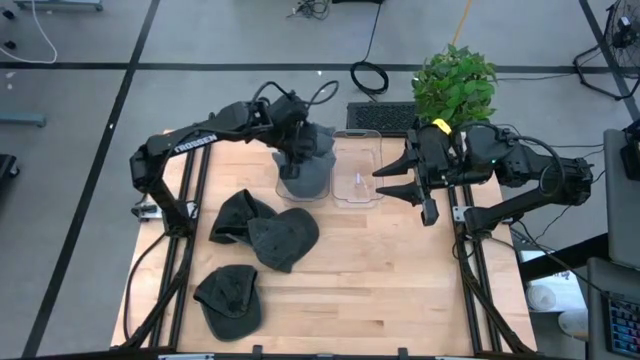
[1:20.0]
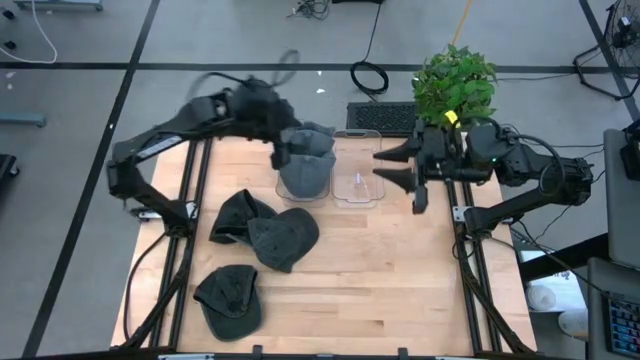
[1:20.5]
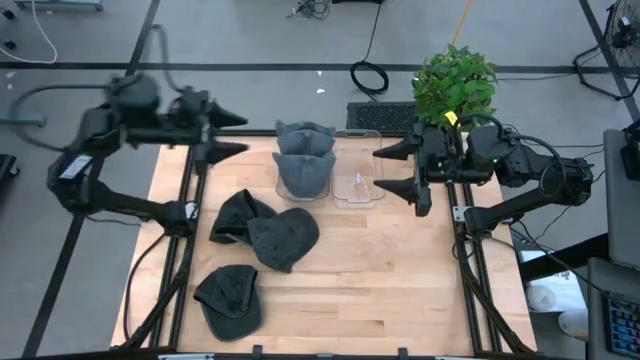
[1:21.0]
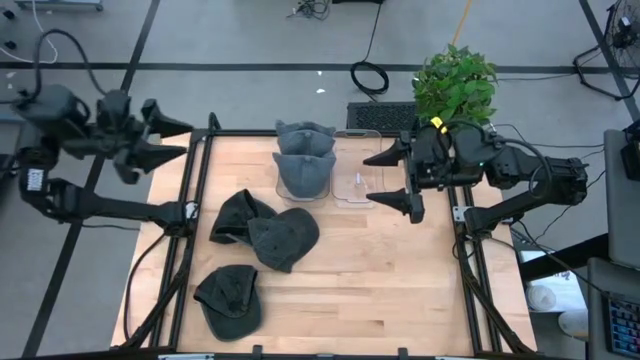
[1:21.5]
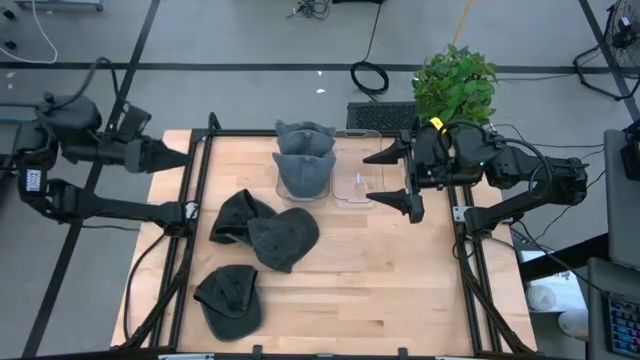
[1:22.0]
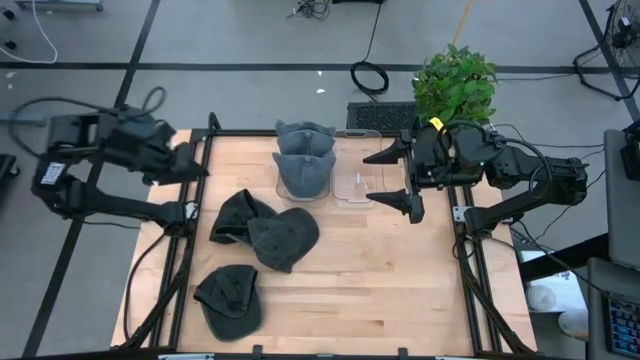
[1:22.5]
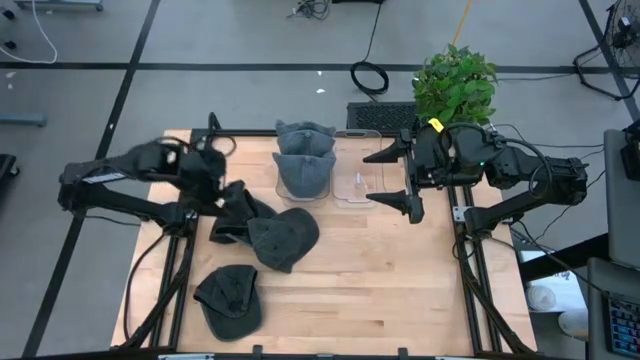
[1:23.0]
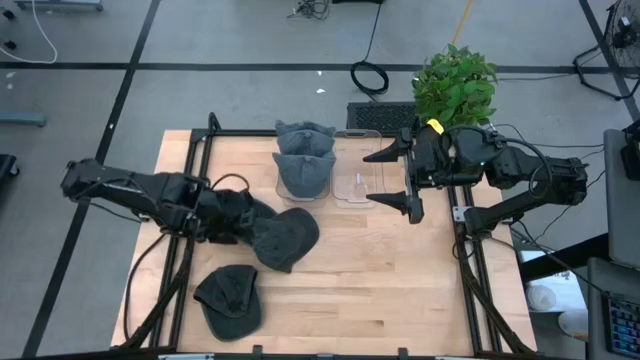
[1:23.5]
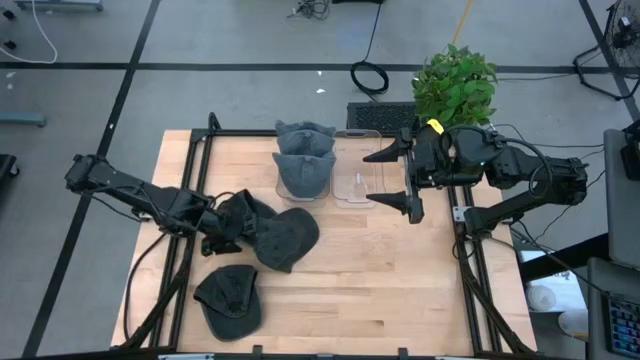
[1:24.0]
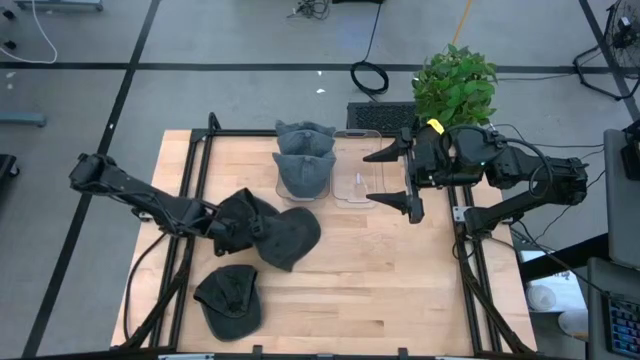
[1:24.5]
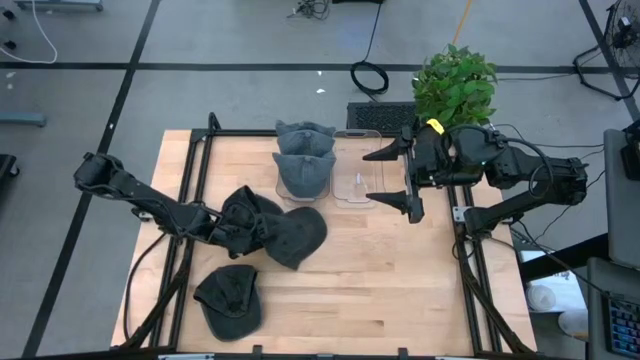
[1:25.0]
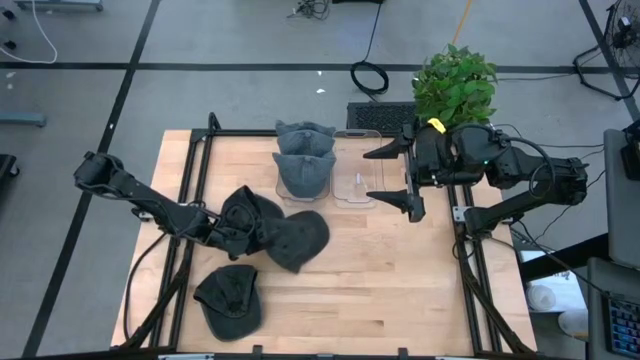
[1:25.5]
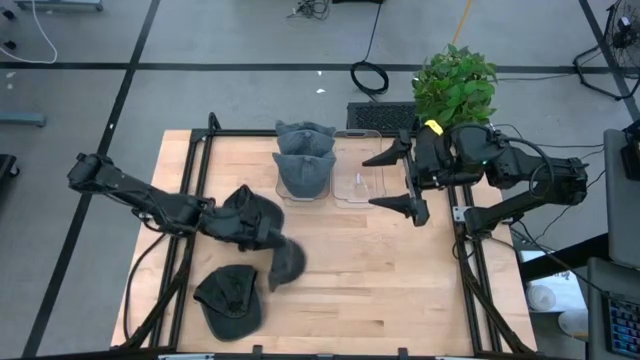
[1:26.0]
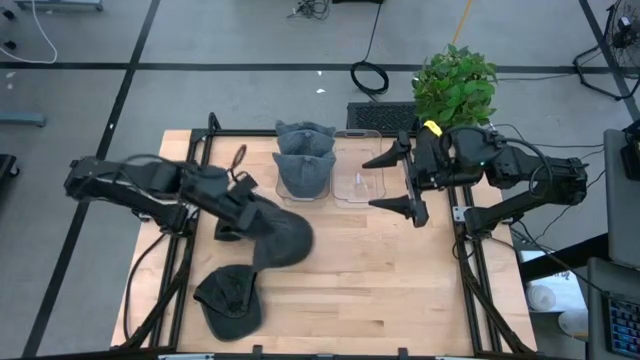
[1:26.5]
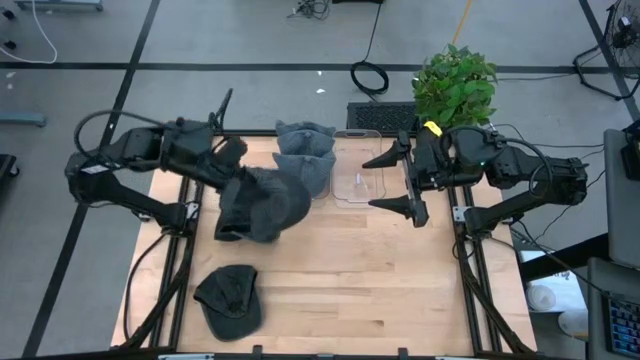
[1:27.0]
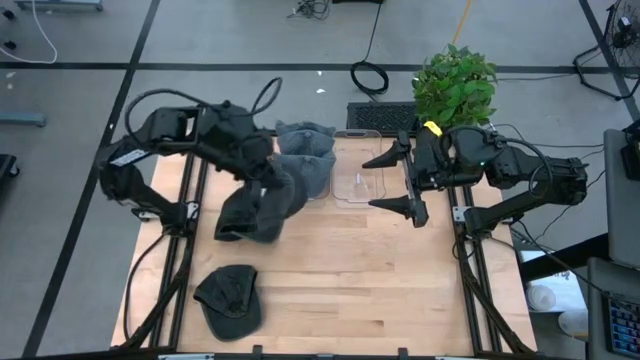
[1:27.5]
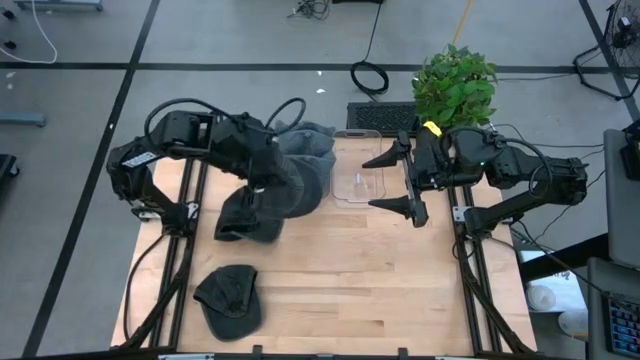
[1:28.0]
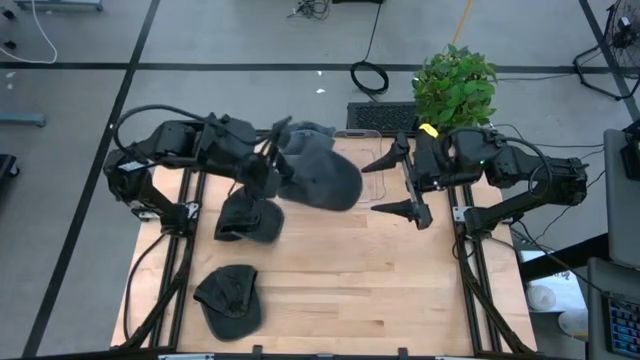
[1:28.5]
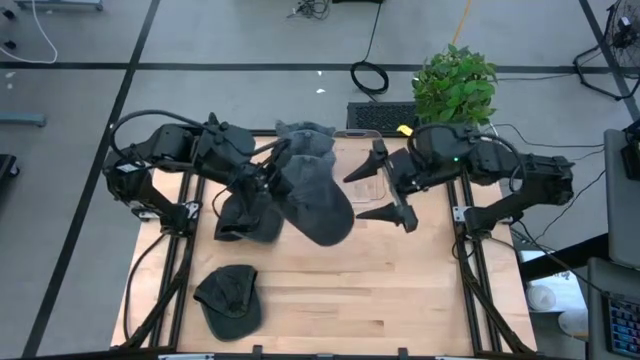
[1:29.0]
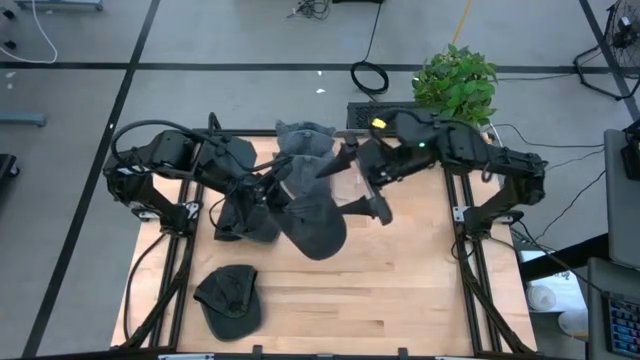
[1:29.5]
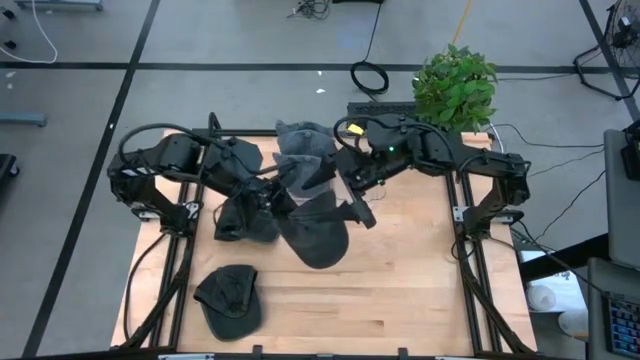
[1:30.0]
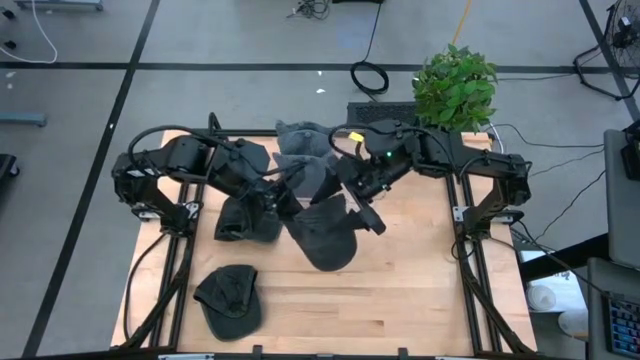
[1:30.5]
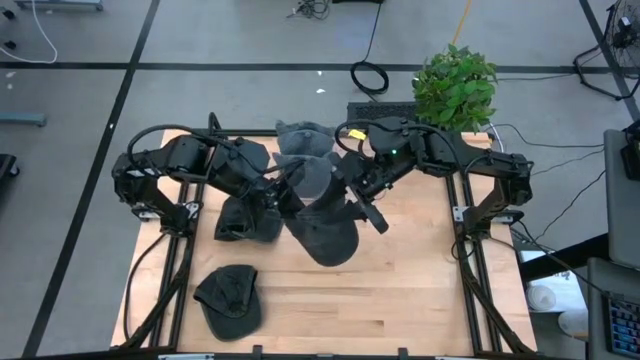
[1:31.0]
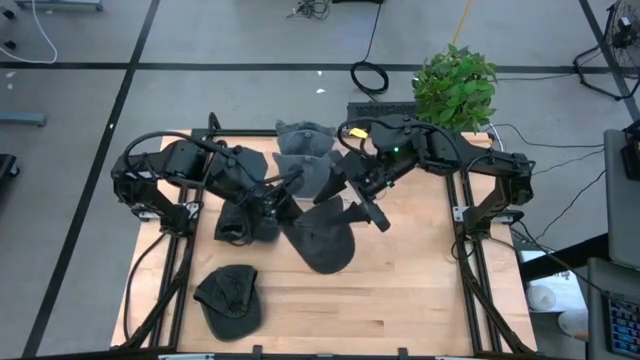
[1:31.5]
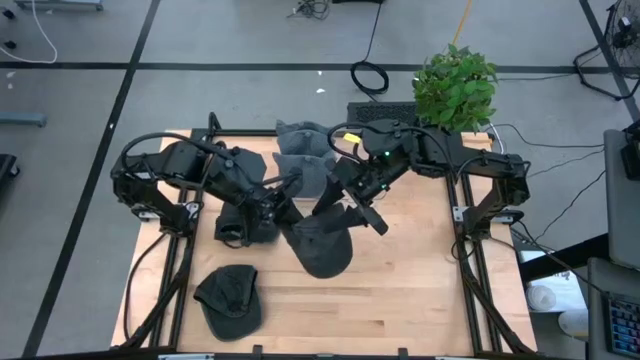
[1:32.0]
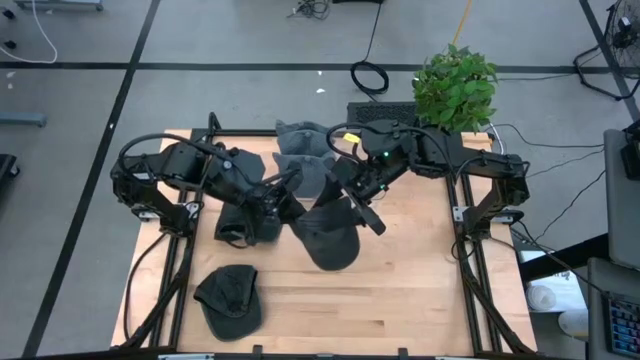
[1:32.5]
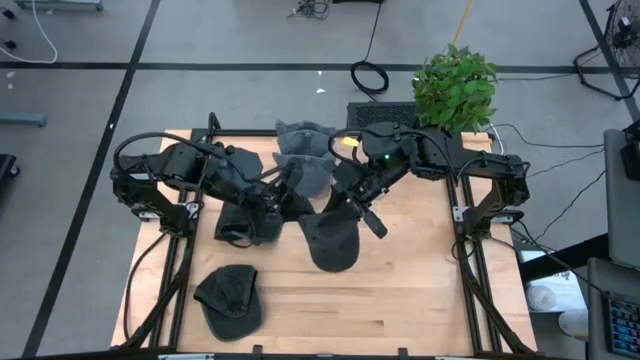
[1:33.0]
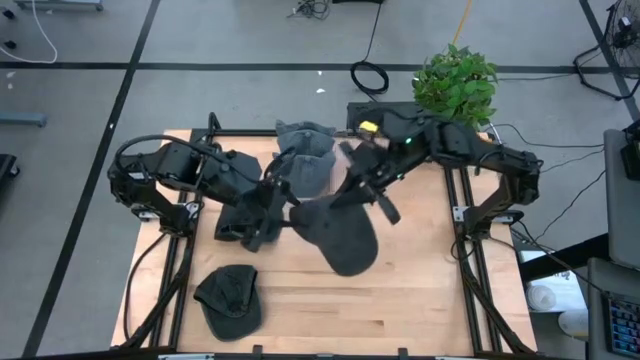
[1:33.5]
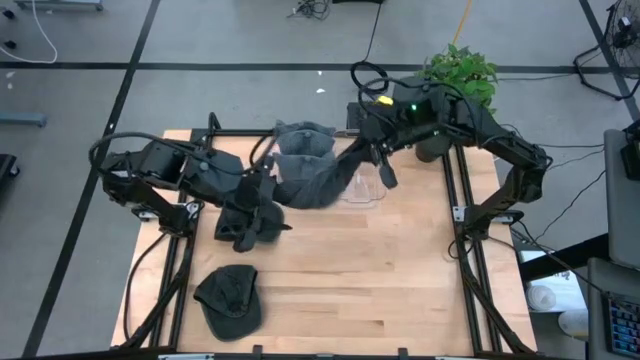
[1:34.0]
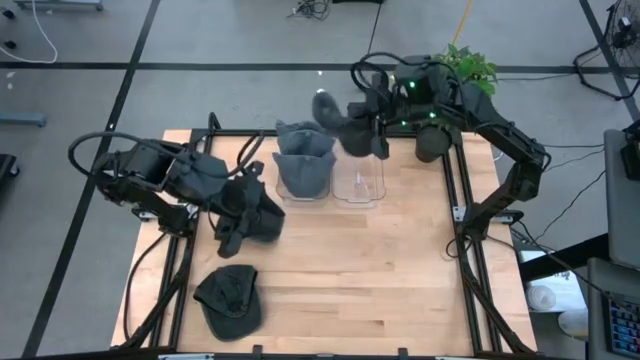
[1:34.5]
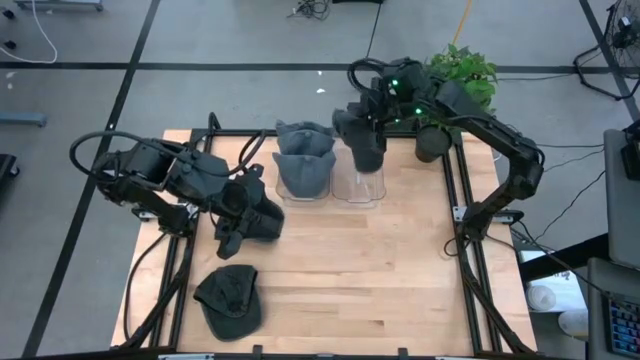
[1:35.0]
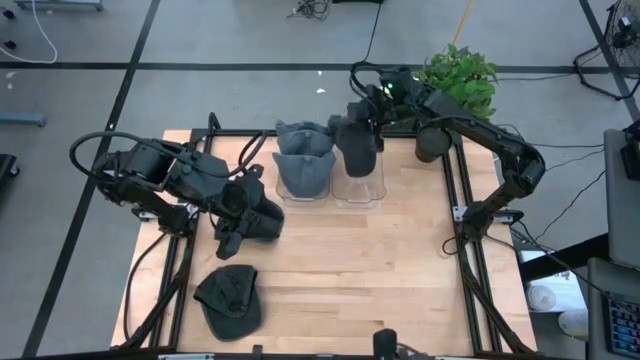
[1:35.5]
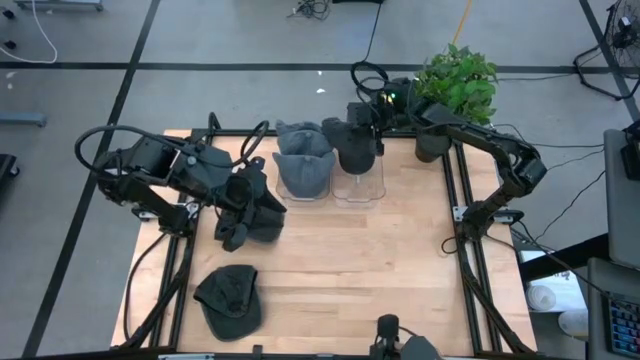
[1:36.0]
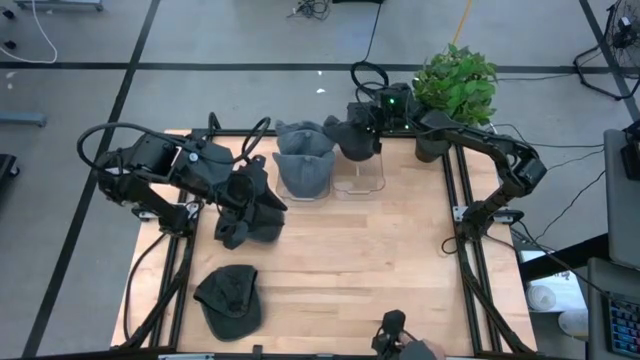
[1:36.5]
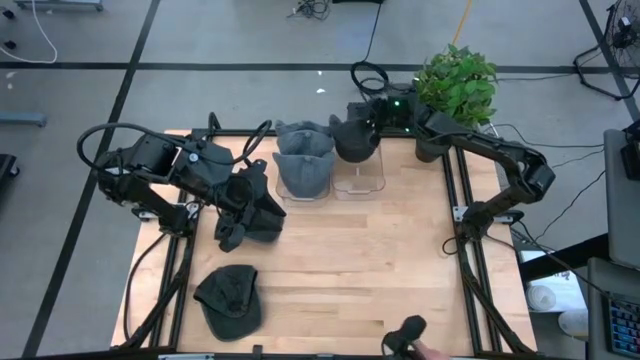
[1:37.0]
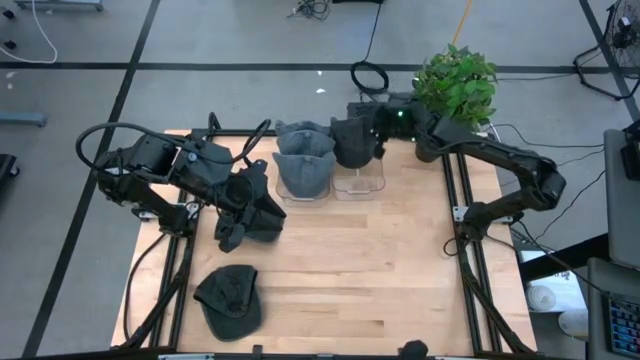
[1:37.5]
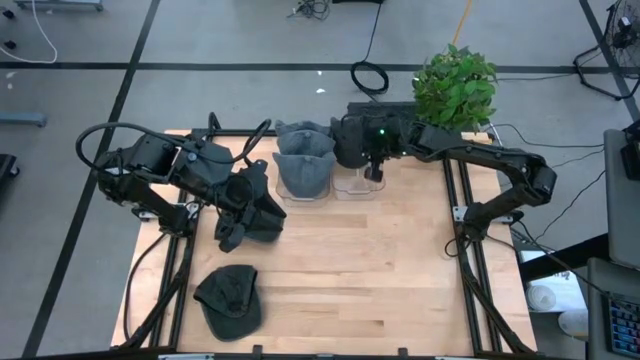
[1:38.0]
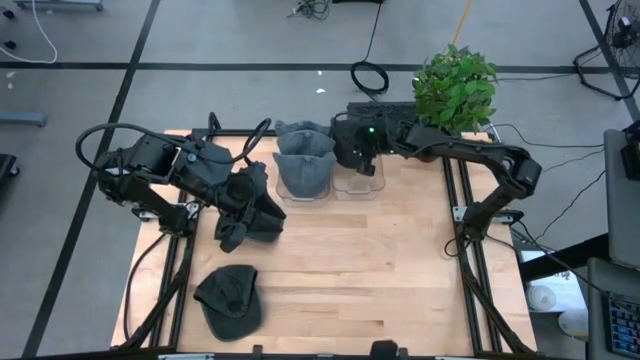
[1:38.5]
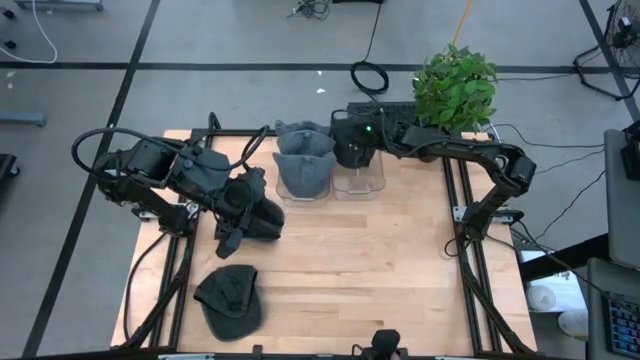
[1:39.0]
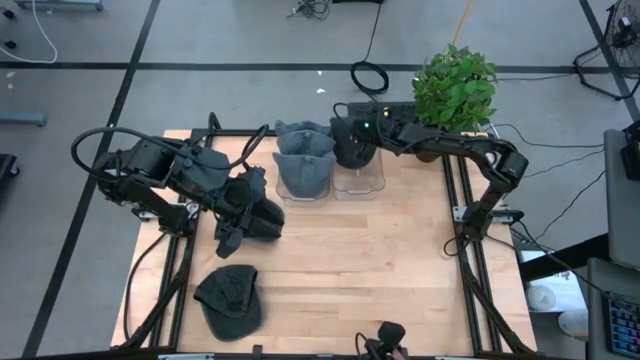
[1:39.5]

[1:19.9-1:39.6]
Task: Pick & Place hat
Put the middle black cap into the right transparent bin
